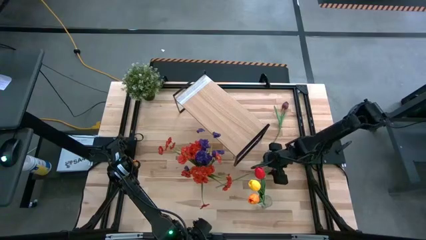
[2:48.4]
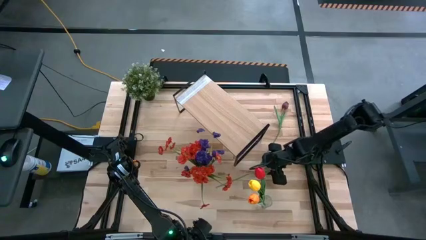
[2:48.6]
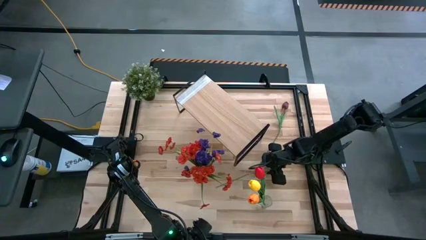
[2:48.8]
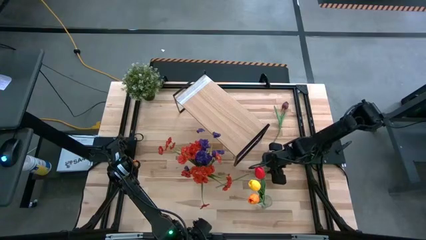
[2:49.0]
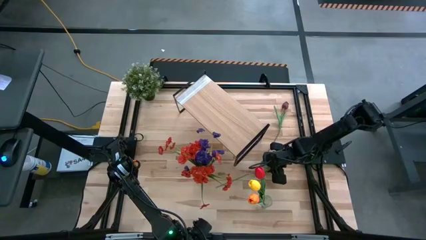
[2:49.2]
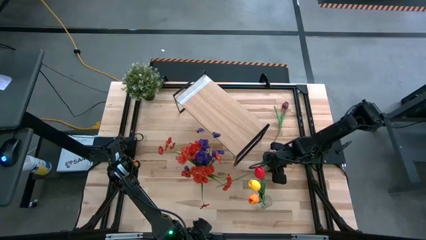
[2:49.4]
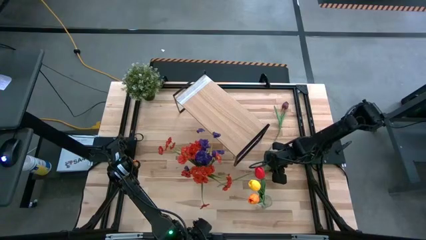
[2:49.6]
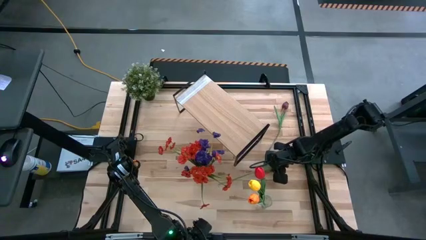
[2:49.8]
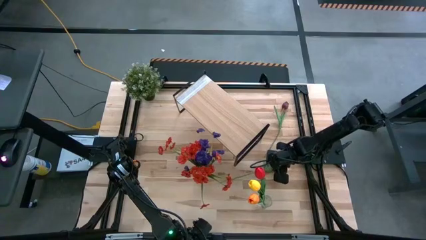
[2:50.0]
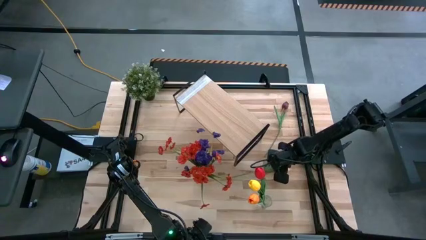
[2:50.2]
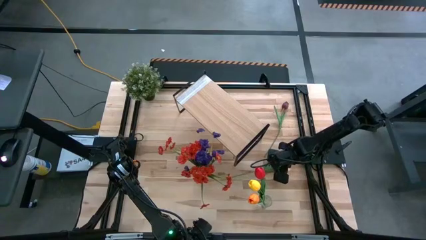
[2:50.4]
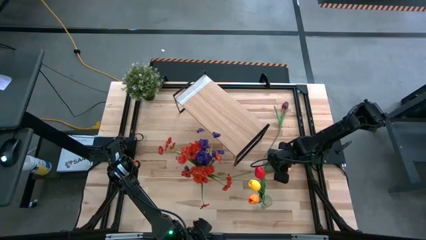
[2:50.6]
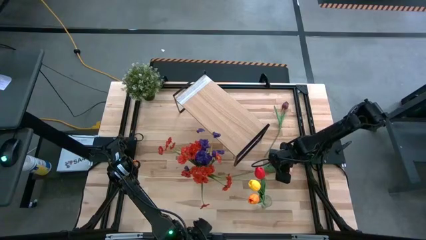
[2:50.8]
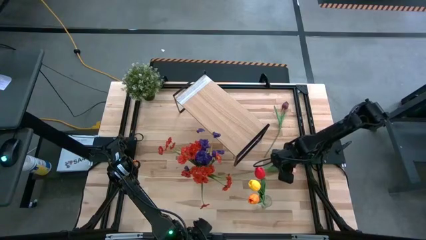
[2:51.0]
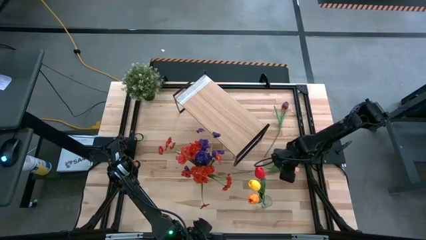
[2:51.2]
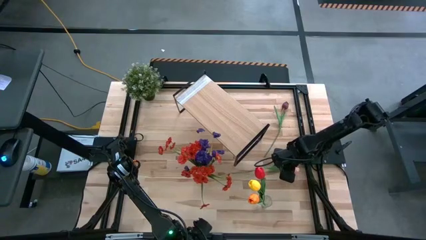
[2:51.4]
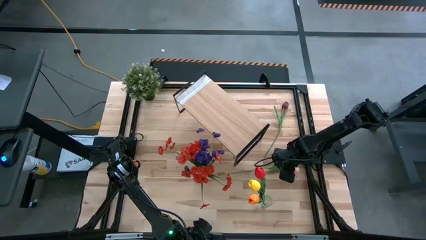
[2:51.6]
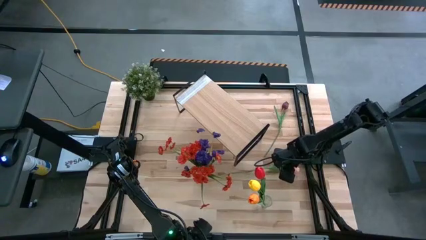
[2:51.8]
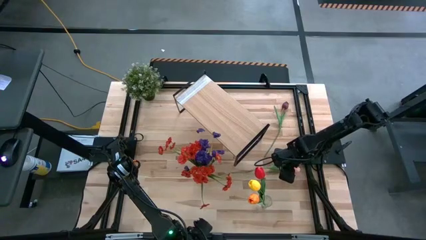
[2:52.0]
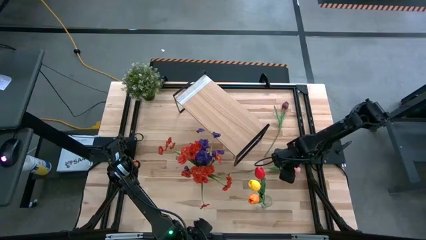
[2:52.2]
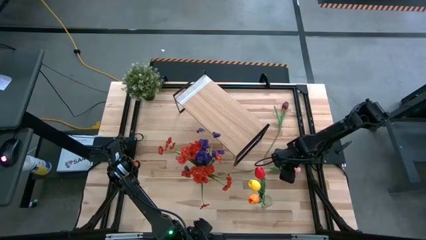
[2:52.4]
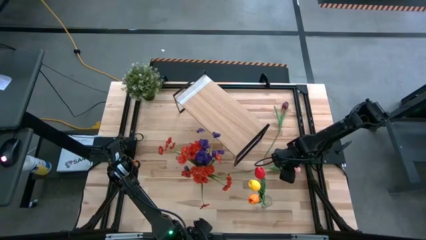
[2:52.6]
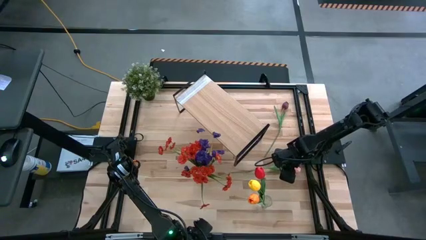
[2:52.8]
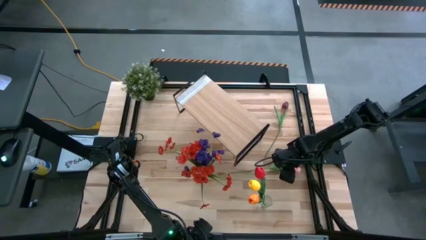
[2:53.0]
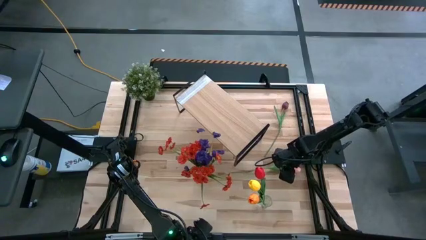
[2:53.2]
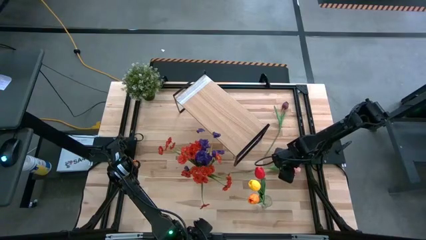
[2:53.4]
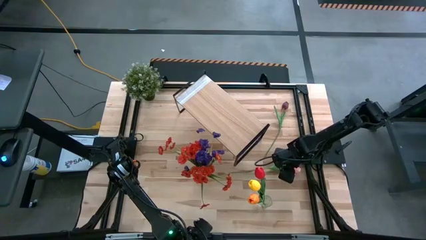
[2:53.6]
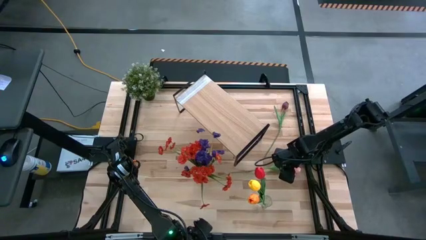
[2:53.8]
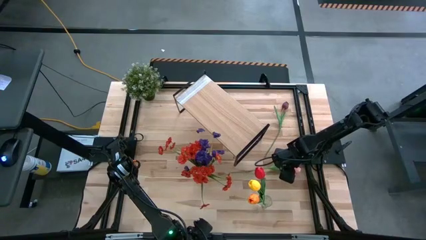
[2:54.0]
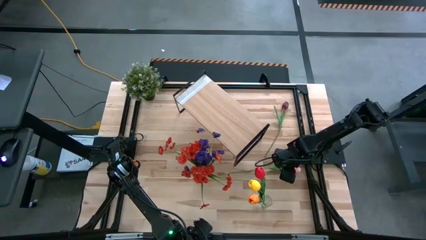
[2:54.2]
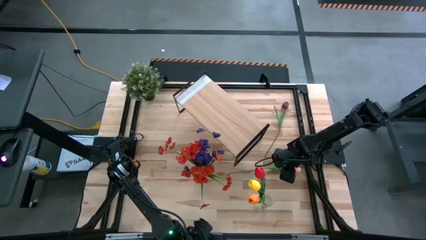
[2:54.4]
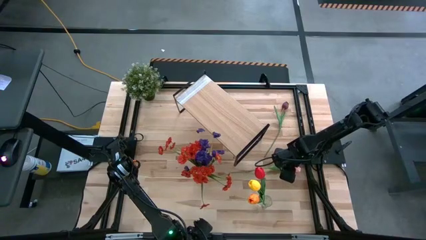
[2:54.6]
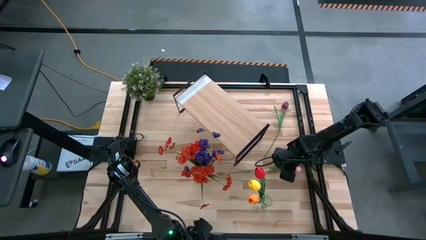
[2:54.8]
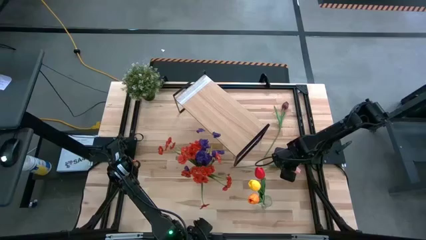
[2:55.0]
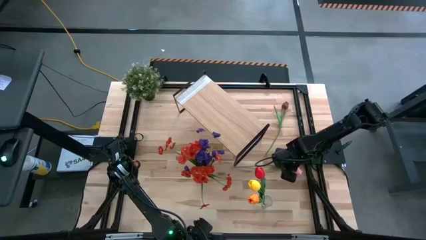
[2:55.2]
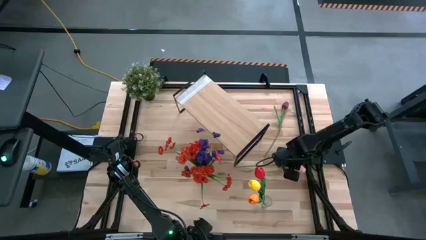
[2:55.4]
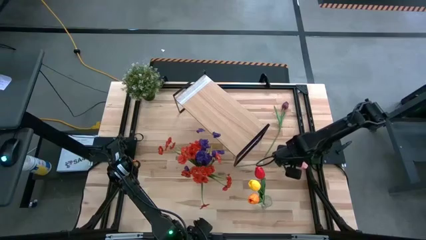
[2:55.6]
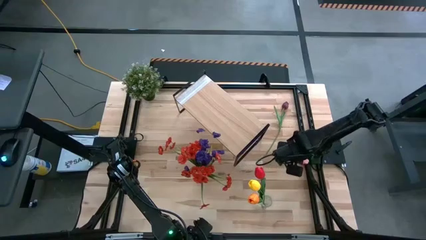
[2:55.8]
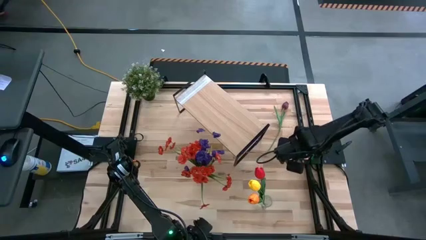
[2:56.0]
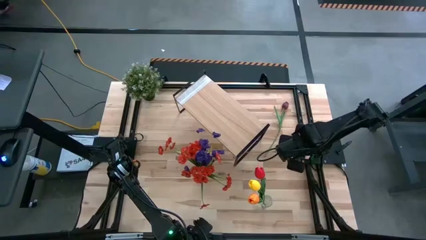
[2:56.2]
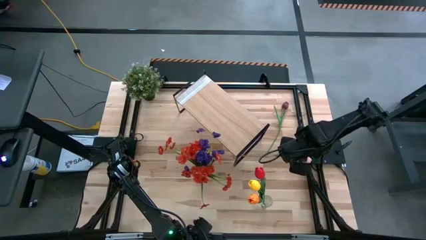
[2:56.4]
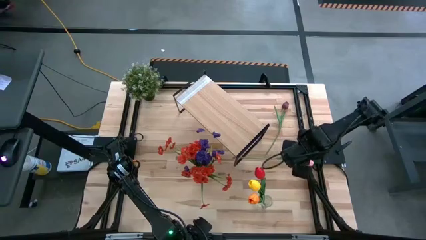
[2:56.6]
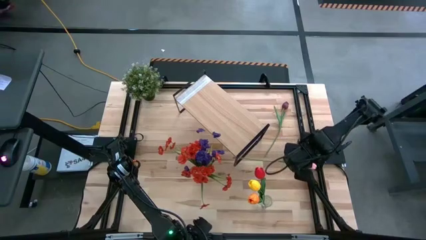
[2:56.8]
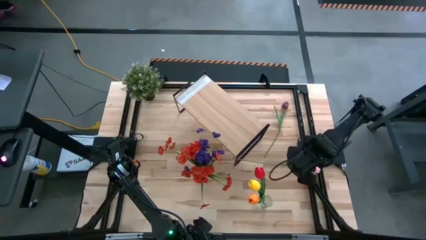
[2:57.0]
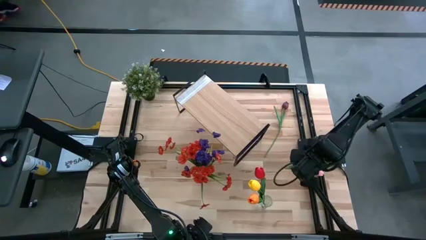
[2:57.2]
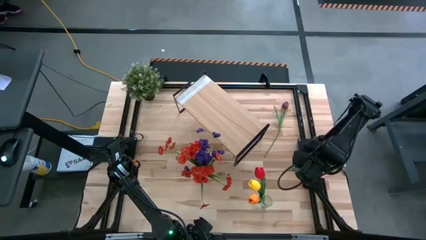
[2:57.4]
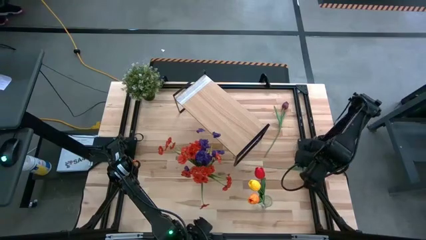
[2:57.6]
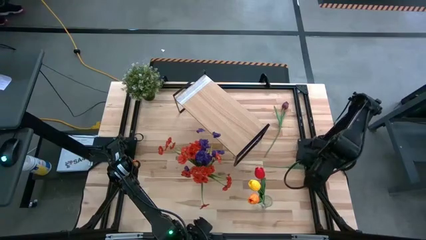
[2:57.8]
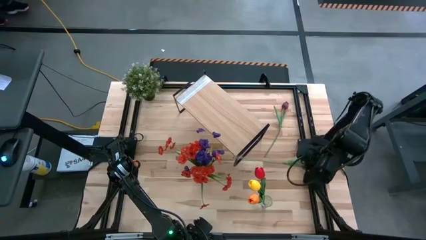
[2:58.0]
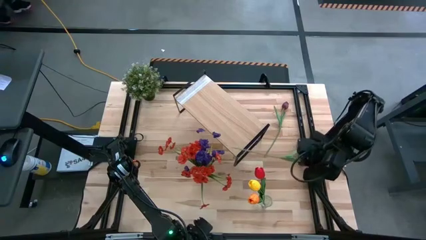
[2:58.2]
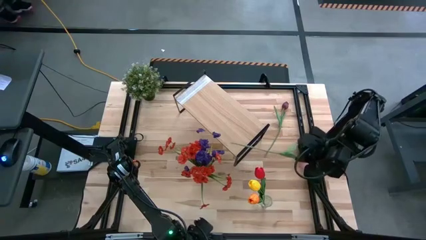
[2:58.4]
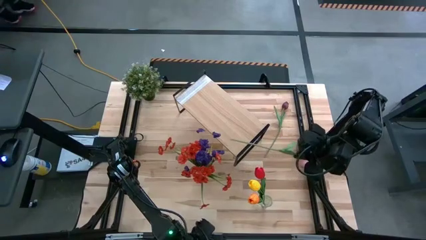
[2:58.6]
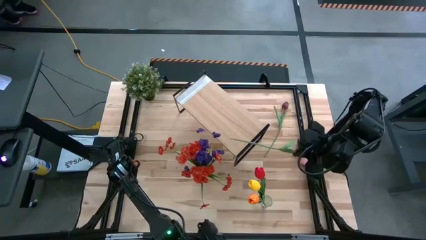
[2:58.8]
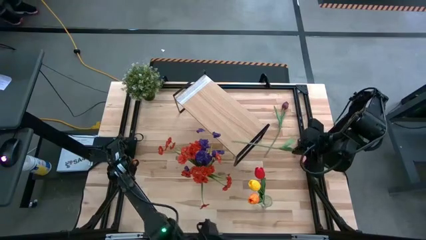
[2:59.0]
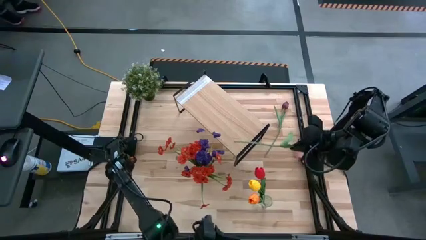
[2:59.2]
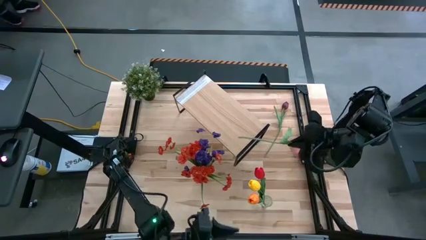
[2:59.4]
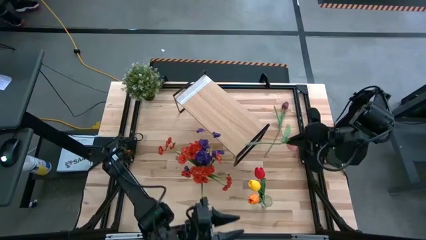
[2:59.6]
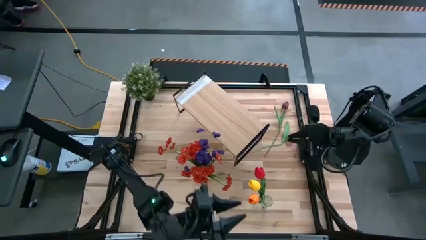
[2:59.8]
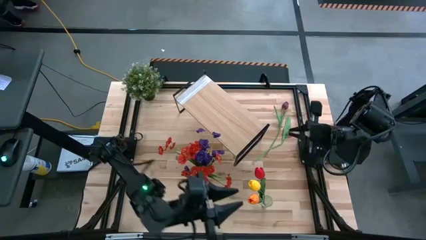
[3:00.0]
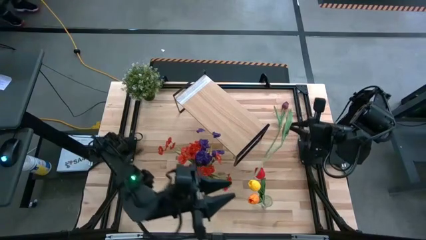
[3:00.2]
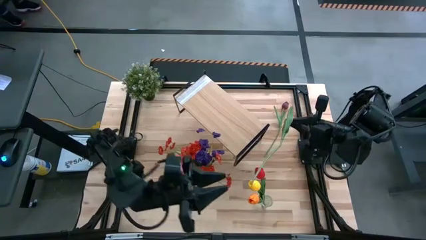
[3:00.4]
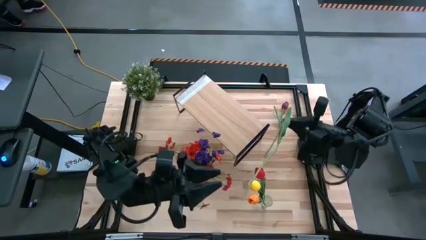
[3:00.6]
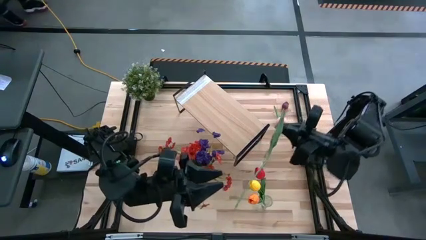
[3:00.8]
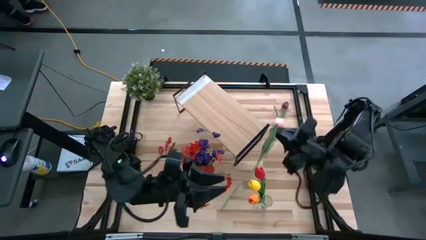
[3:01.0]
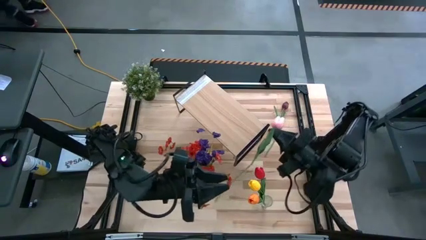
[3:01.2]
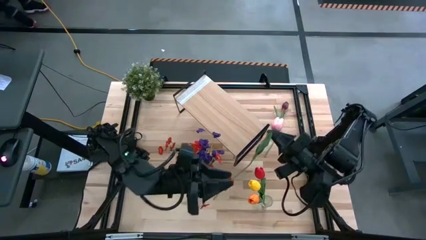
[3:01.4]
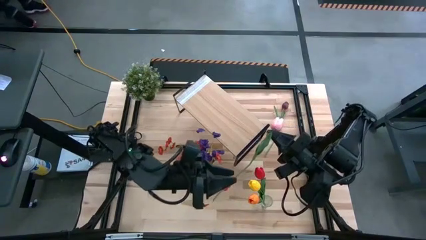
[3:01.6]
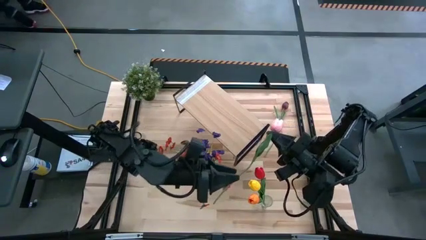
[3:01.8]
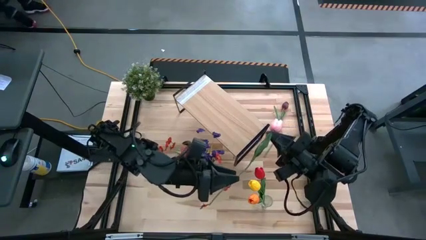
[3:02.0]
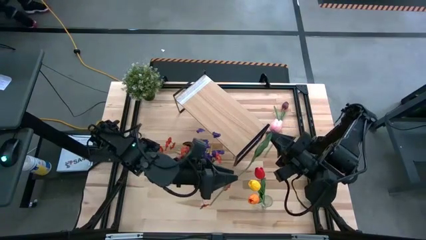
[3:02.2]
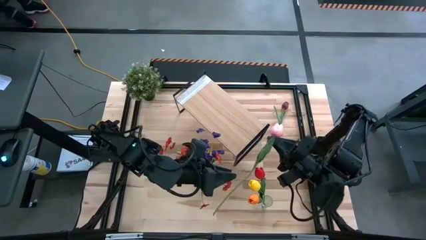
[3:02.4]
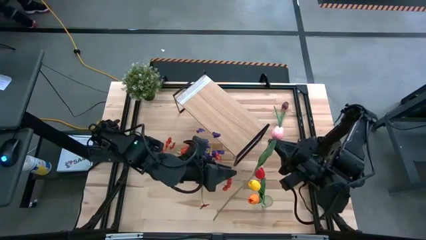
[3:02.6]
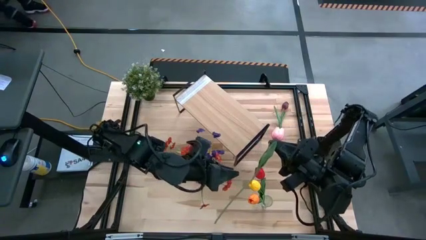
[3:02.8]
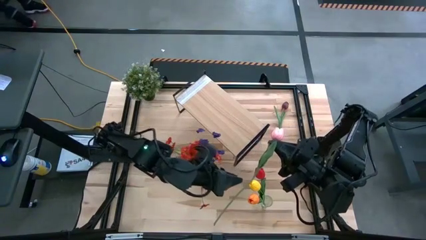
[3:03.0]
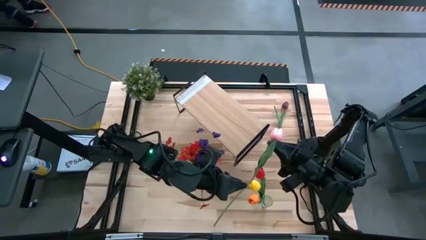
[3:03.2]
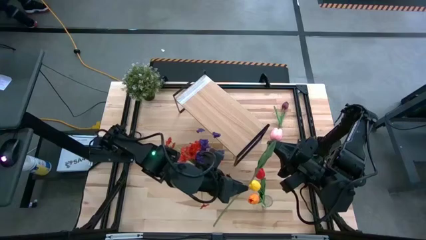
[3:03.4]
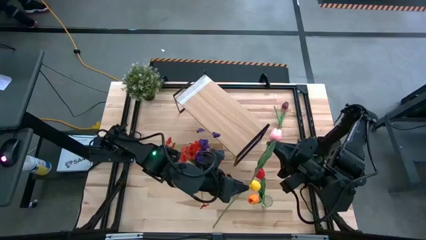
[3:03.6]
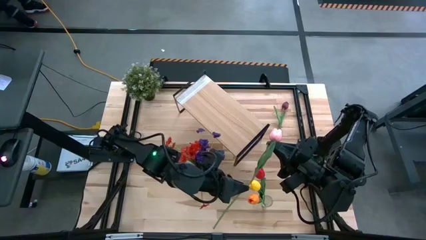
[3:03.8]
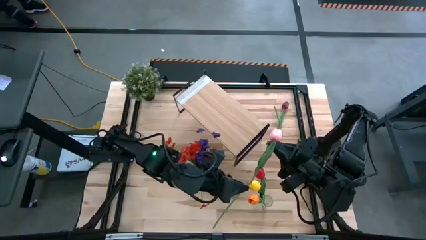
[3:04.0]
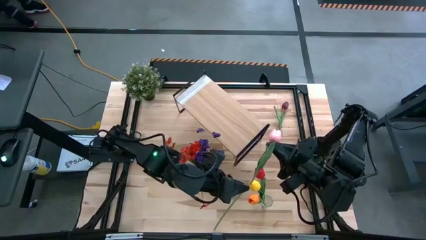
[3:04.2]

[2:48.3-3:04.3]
Task: Pick and place flowers into a vace then onto a shelf
Put the pink tulip into the right transparent vase
